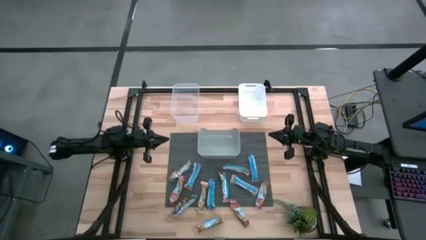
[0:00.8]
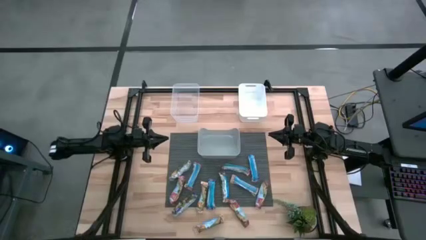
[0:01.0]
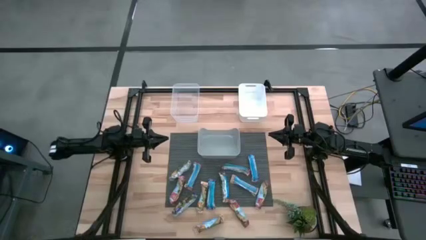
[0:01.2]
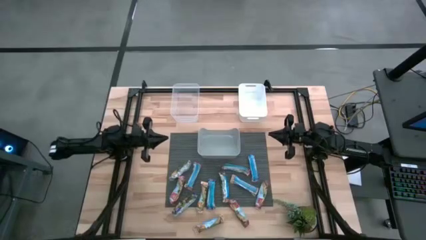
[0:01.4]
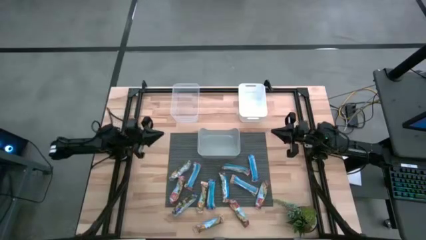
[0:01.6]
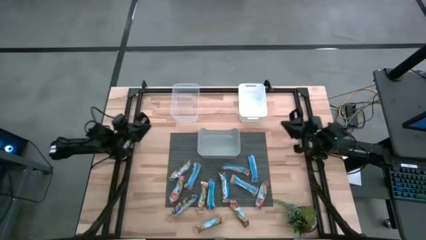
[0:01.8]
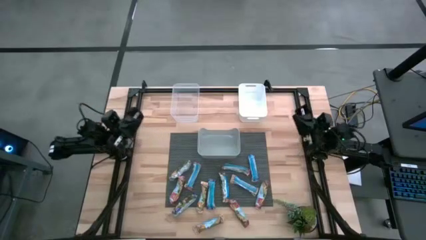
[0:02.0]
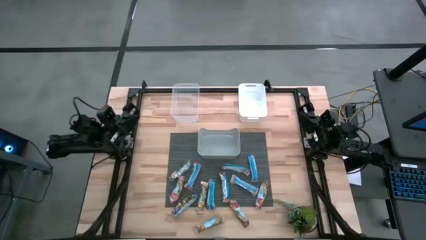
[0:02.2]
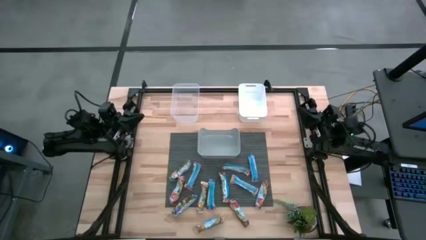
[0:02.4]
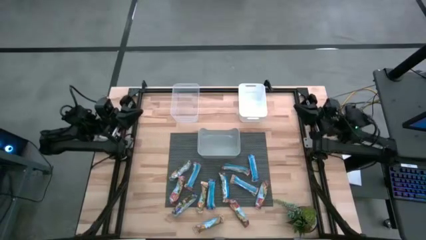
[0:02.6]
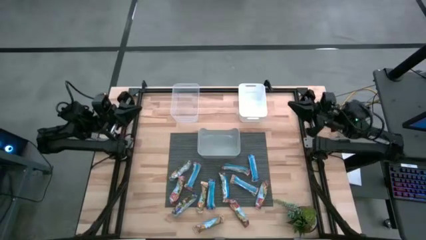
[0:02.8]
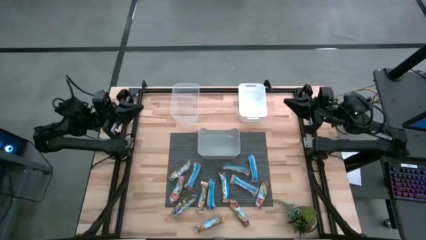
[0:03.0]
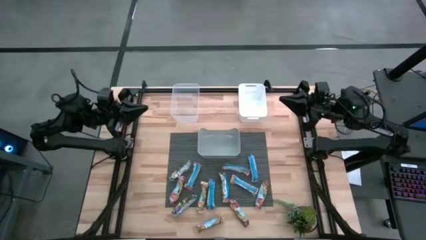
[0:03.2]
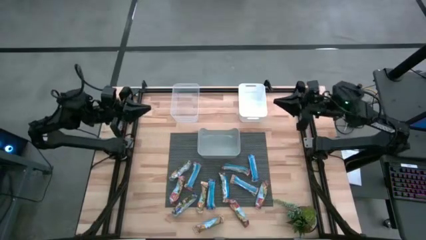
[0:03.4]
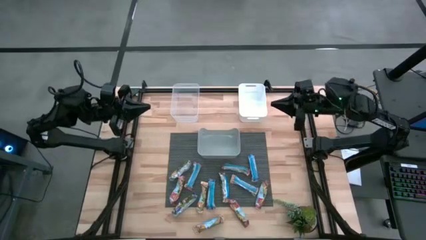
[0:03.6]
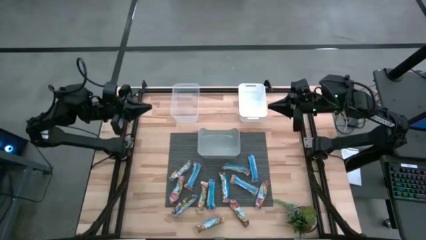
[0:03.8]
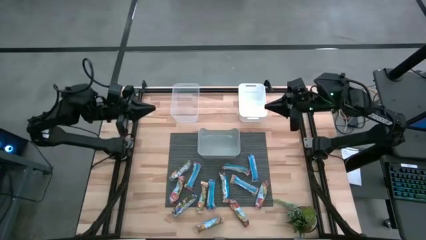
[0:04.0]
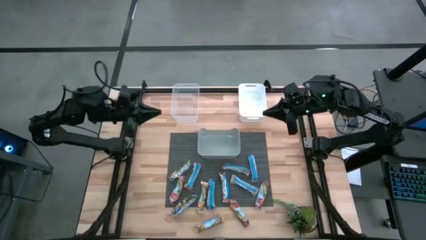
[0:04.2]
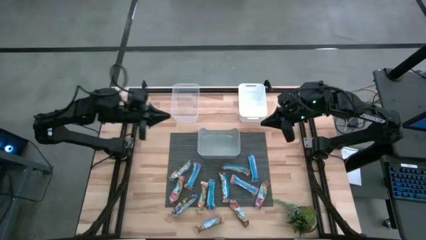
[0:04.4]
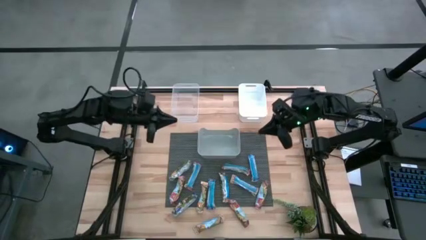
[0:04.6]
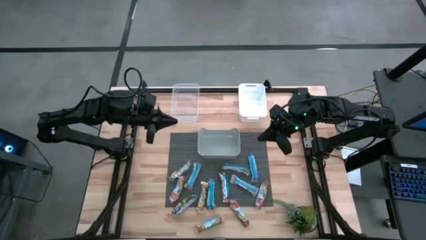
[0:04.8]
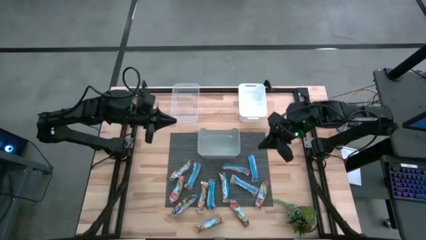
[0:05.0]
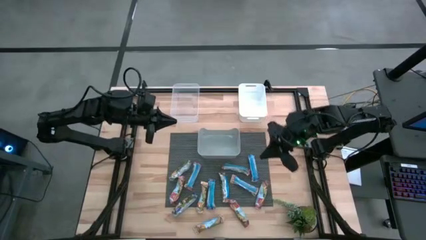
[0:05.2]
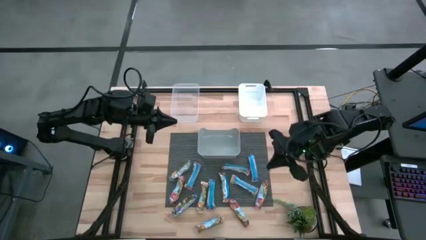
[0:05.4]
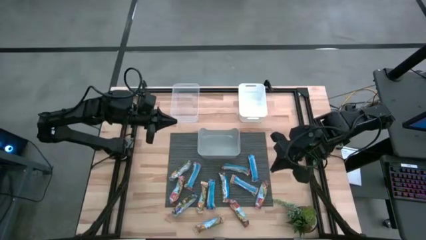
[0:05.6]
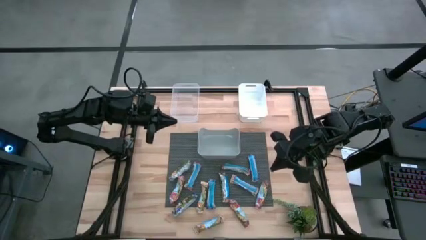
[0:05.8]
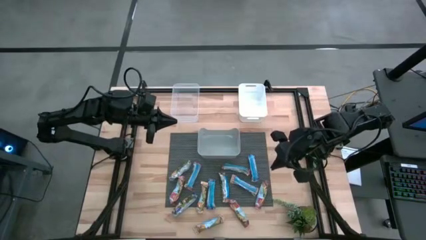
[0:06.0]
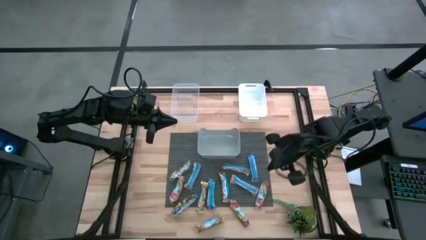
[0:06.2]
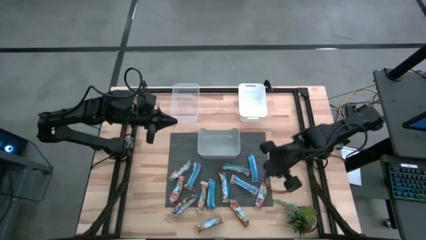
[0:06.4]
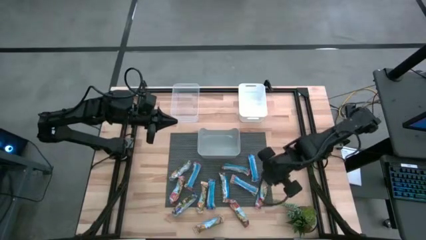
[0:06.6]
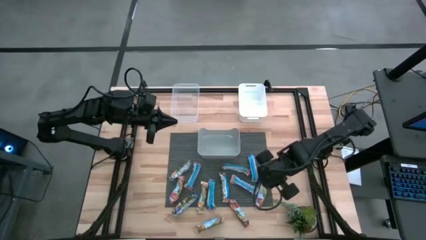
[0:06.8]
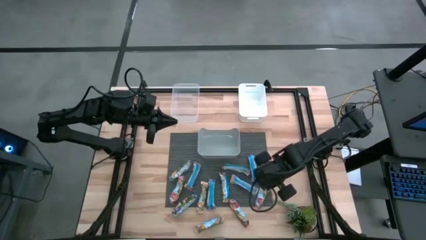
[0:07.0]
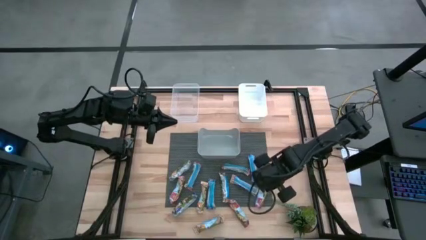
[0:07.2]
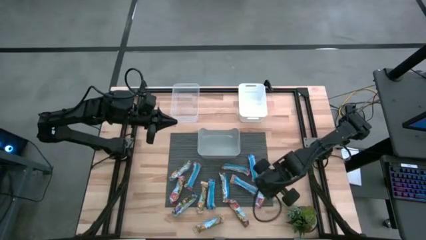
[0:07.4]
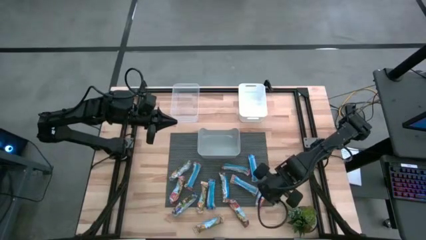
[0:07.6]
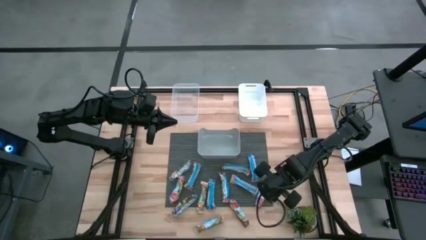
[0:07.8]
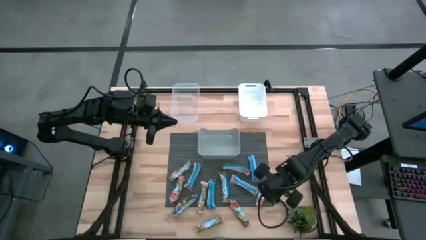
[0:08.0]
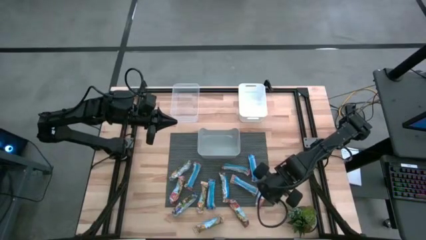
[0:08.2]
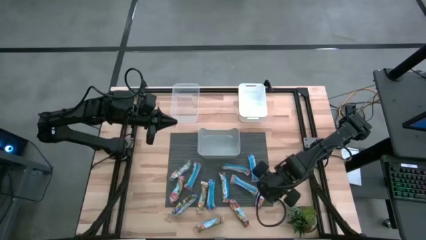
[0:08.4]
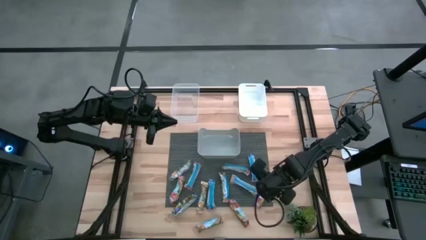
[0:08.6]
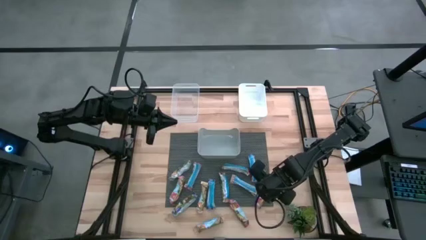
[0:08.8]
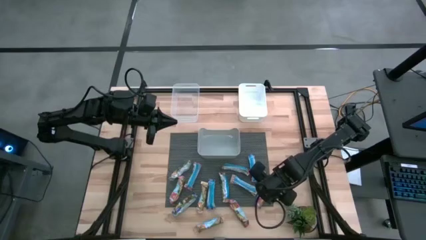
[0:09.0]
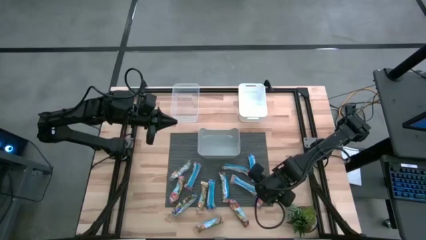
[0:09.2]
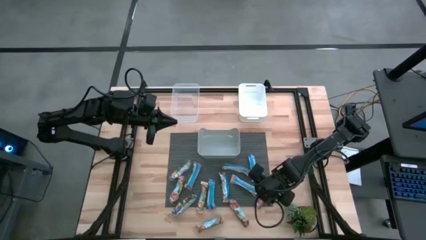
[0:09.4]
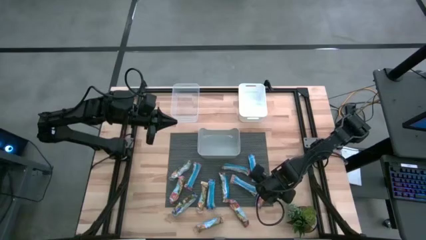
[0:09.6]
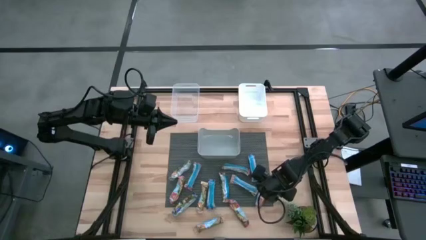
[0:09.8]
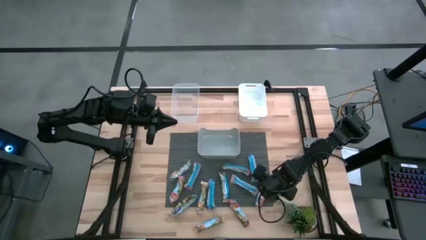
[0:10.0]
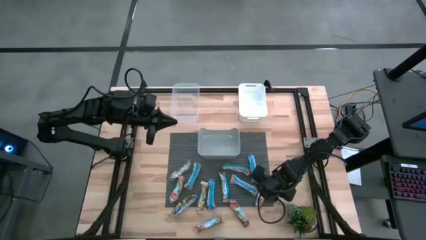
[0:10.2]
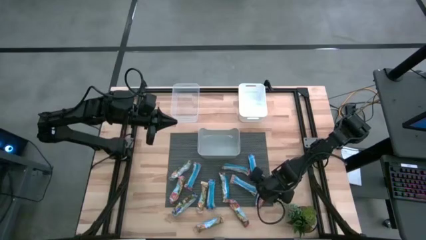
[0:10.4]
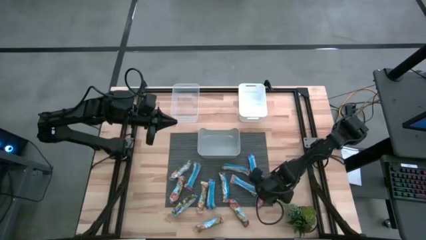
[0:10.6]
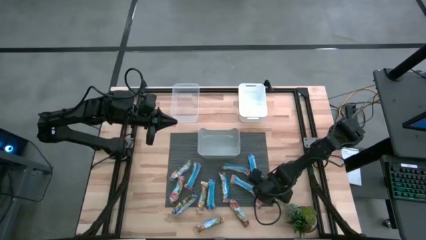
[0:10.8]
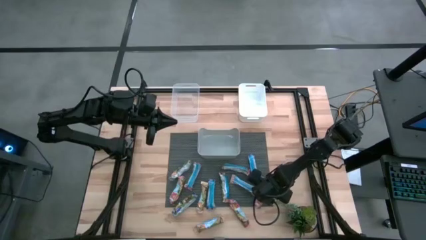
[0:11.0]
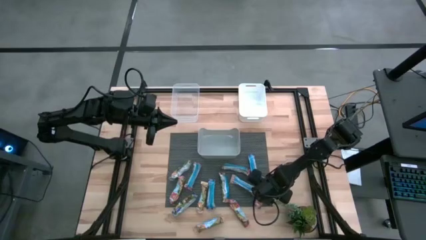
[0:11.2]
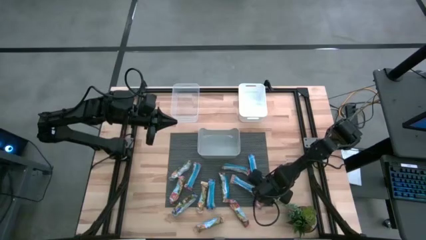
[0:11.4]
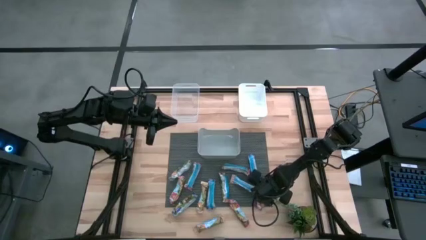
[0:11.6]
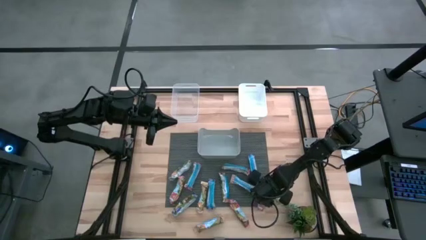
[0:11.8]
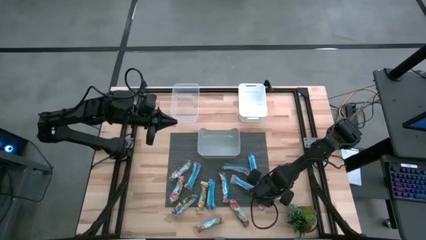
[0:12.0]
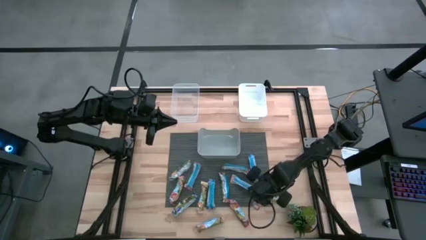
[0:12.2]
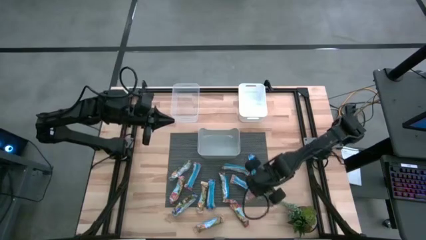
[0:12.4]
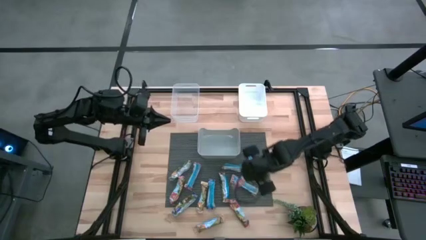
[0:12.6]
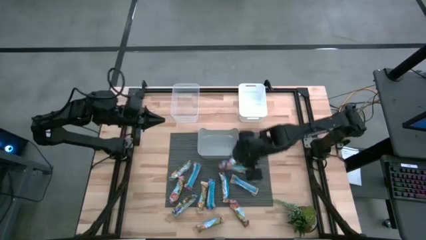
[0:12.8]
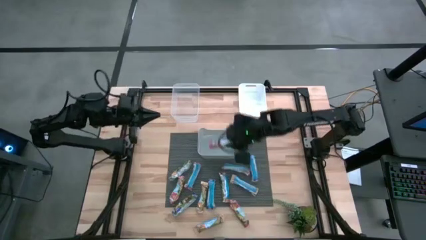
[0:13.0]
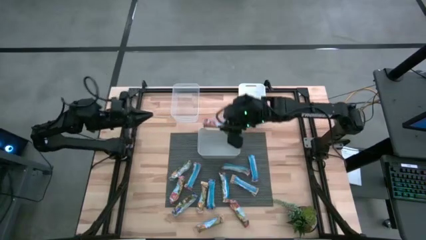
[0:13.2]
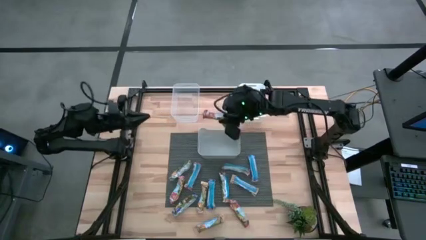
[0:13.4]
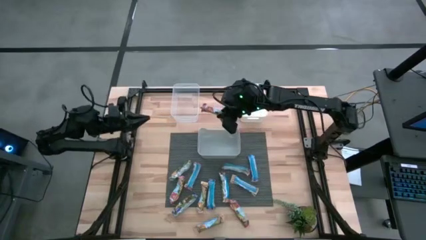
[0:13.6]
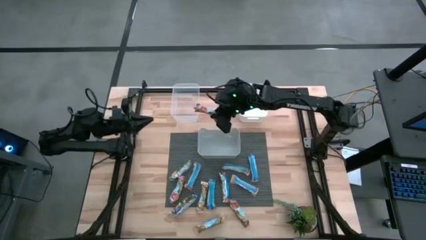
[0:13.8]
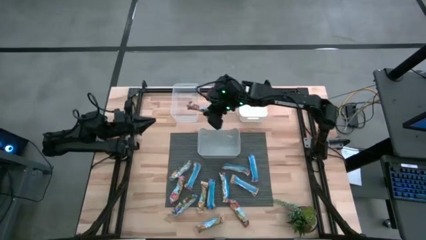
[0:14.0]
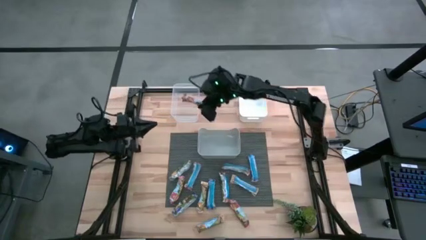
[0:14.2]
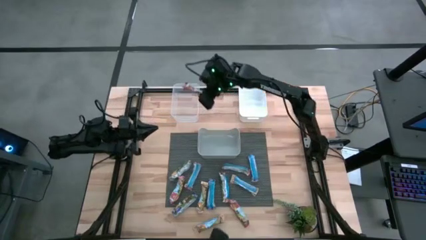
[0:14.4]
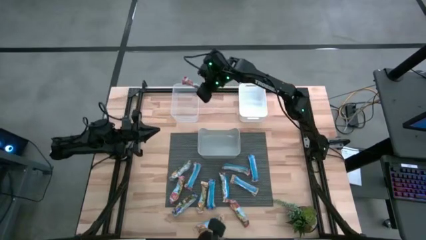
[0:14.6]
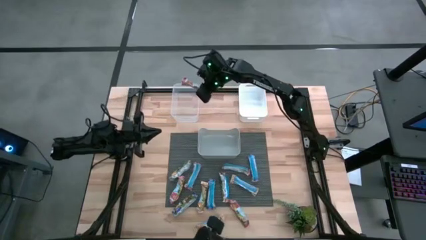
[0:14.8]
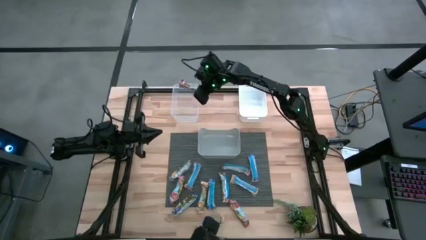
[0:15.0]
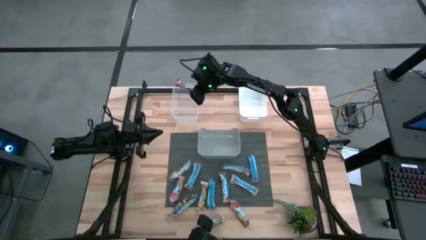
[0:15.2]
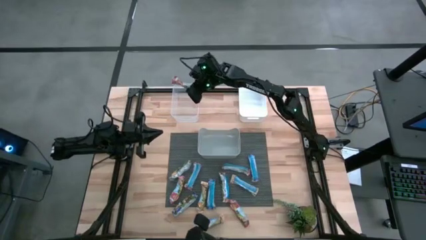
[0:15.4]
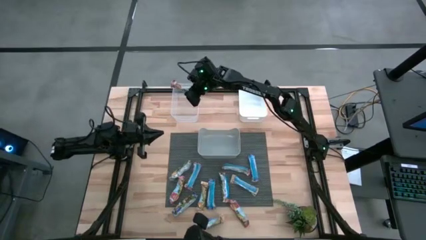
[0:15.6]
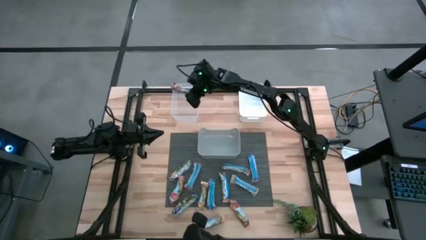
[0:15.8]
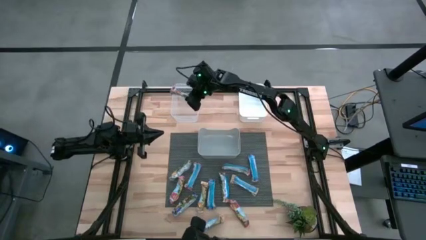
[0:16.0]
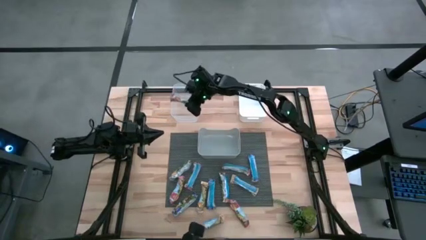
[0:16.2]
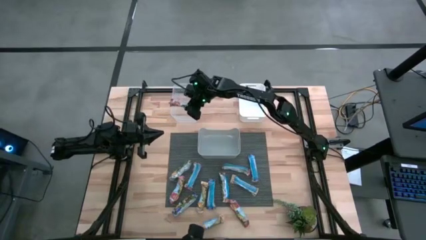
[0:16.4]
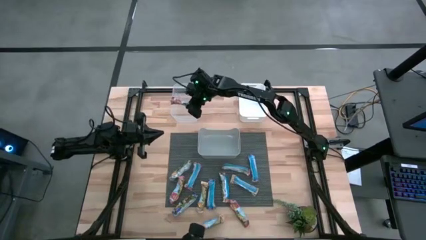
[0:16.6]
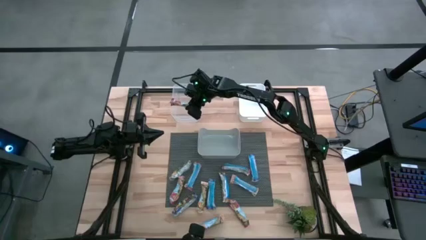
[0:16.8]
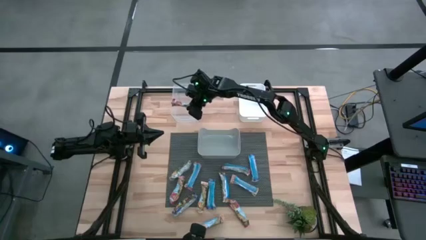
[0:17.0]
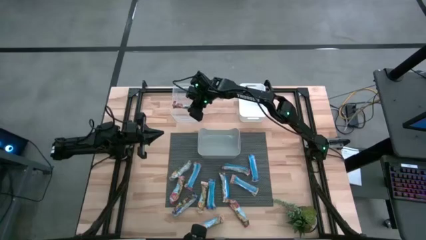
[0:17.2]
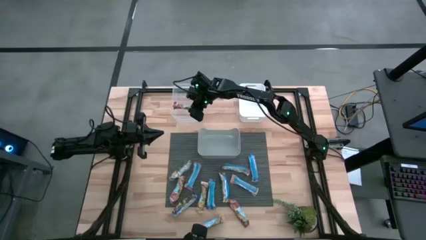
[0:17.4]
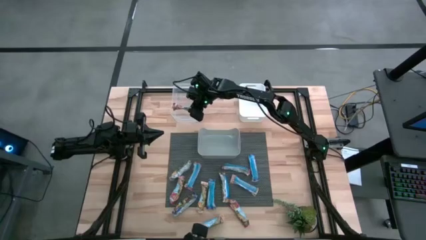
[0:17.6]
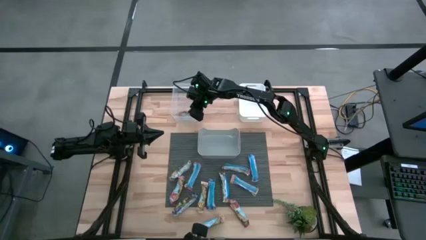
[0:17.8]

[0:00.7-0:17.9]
Task: Pick and place Granola Bars by type
Put the red granola bar into the transparent bin
